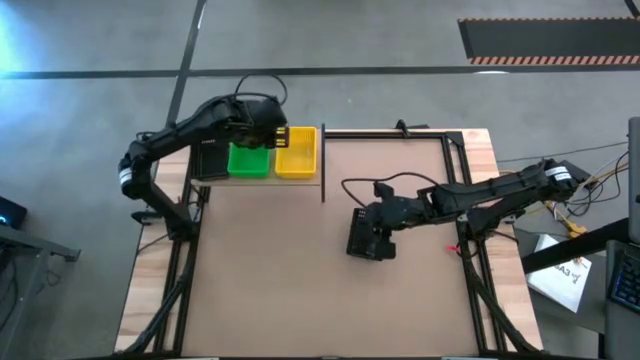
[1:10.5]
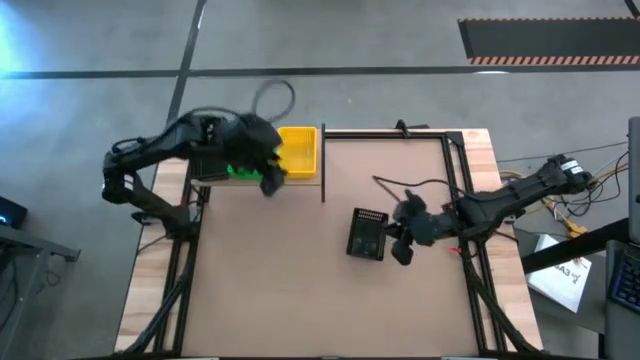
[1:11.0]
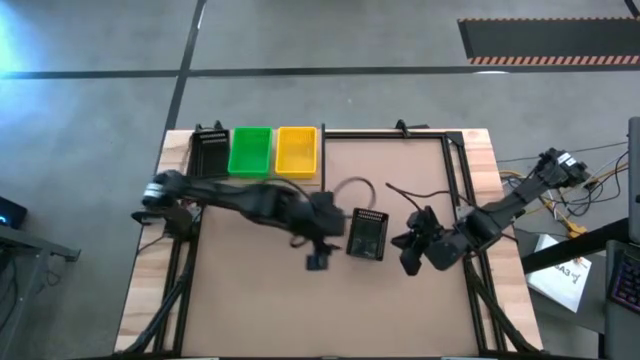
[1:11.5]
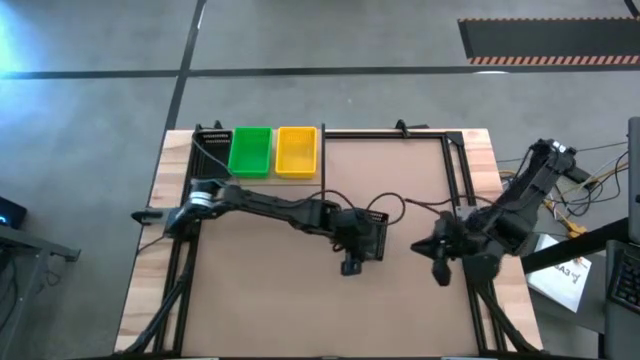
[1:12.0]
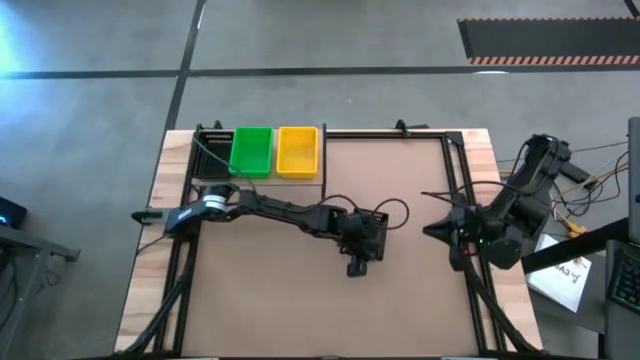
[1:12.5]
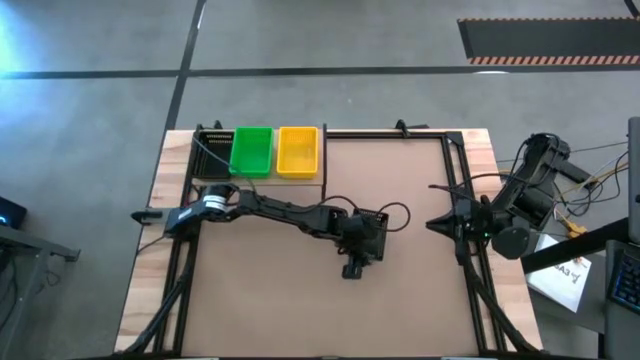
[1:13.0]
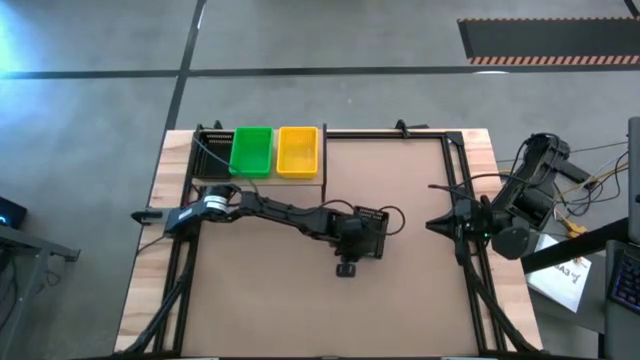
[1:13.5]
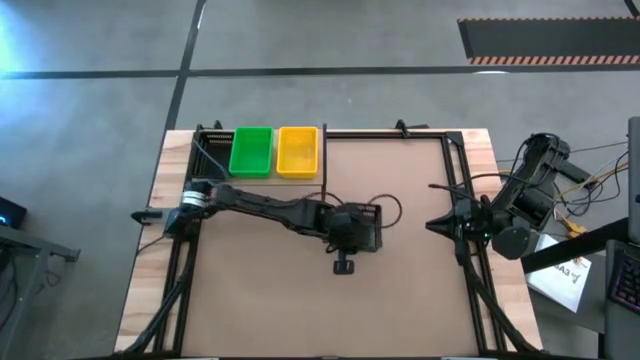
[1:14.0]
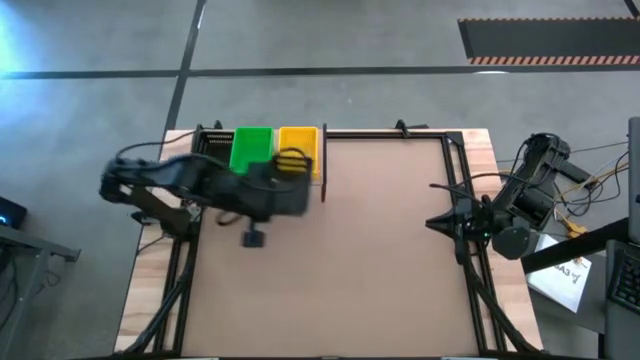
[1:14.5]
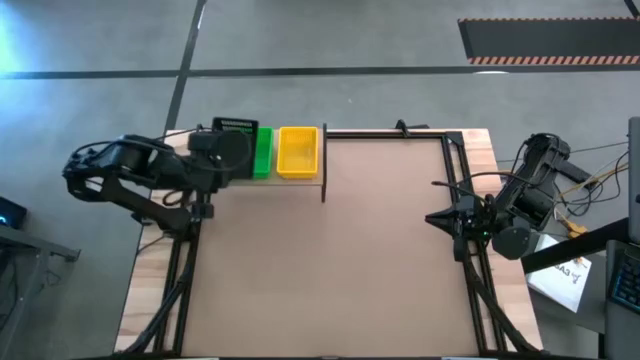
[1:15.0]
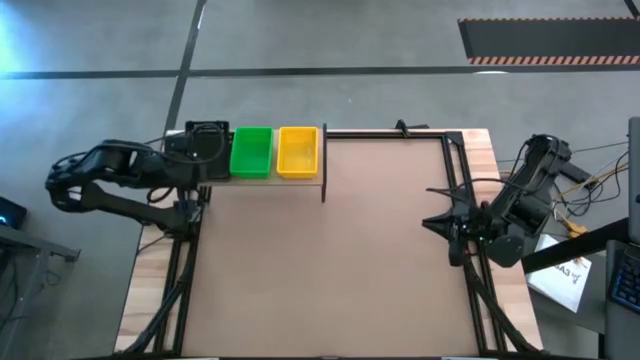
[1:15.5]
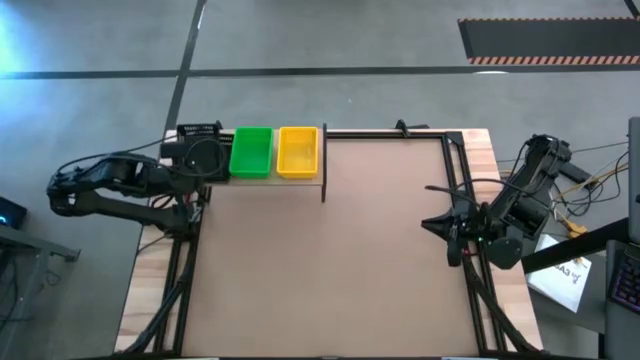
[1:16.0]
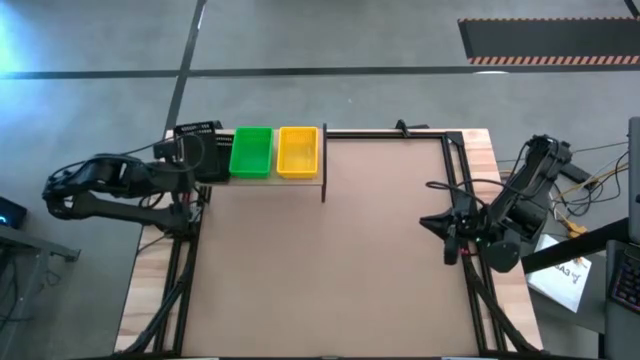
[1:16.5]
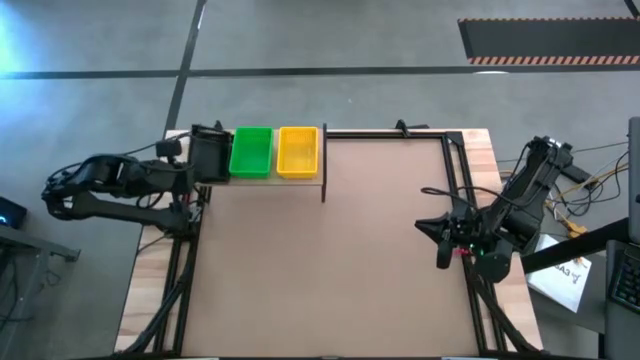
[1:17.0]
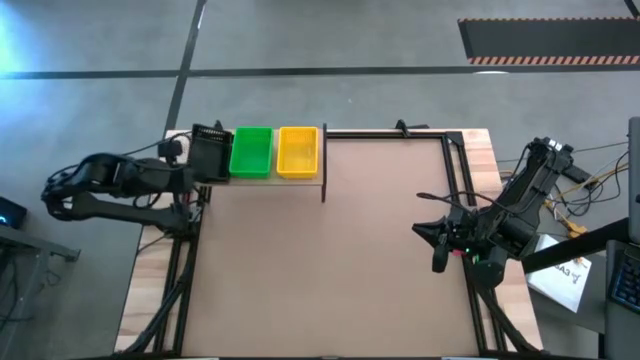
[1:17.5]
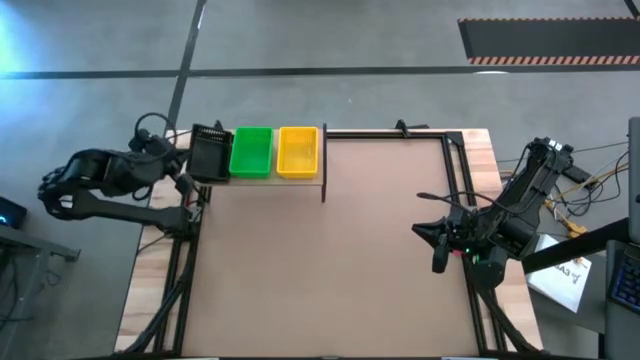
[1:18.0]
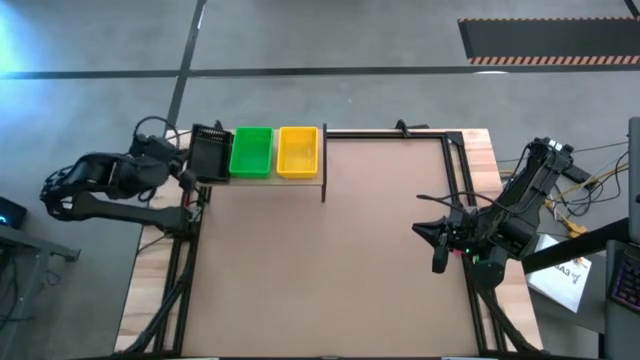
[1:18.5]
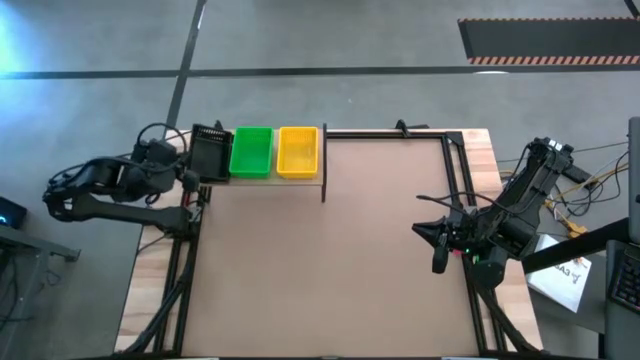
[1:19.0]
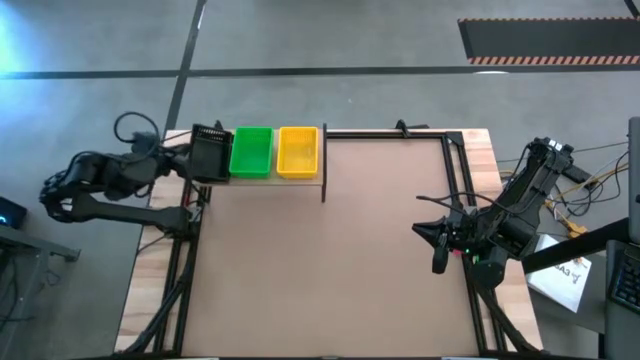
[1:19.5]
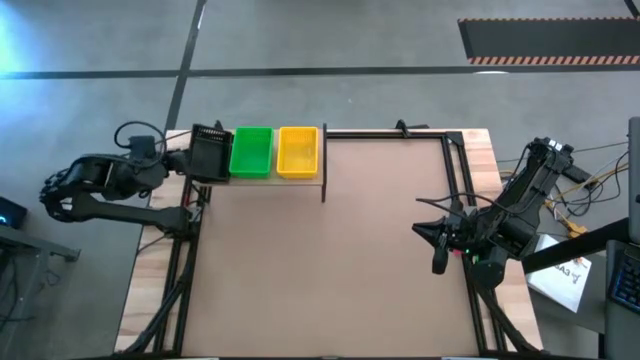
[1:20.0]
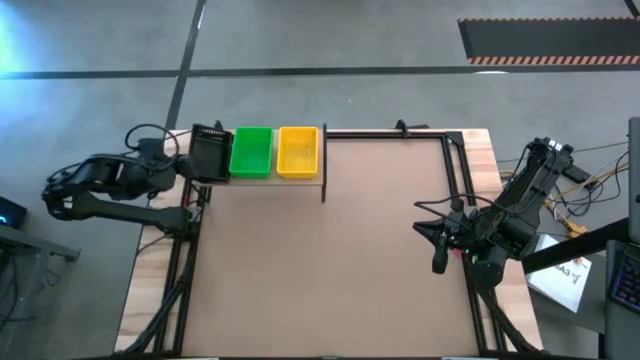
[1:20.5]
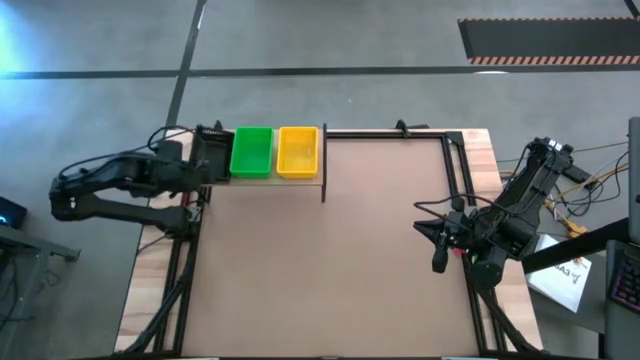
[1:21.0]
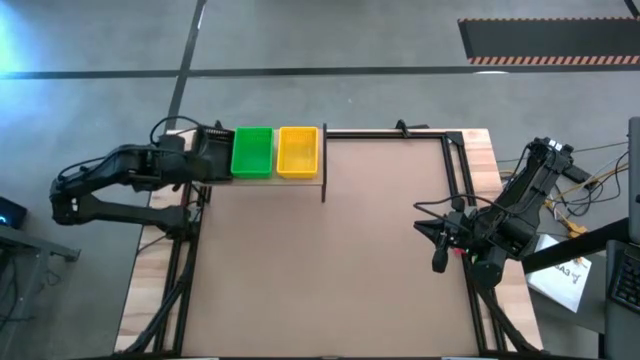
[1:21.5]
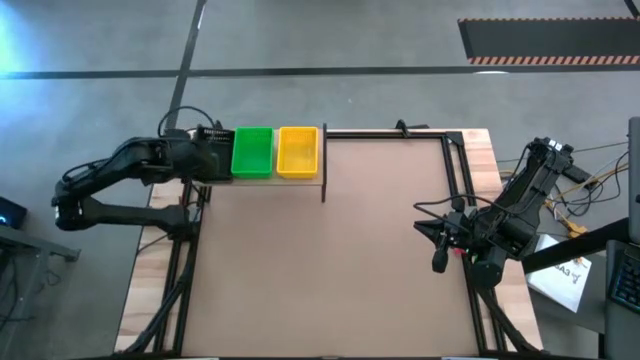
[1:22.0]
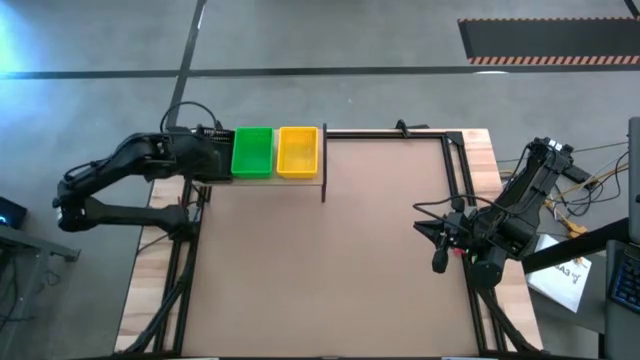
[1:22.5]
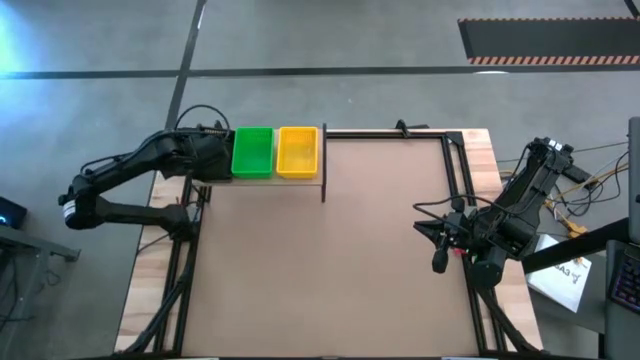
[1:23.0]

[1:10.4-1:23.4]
Task: Stack baskets on shelf by color
Stack the black bin on top of the other black bins on the shelf

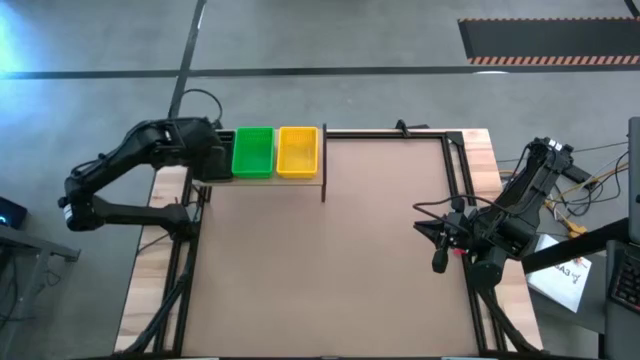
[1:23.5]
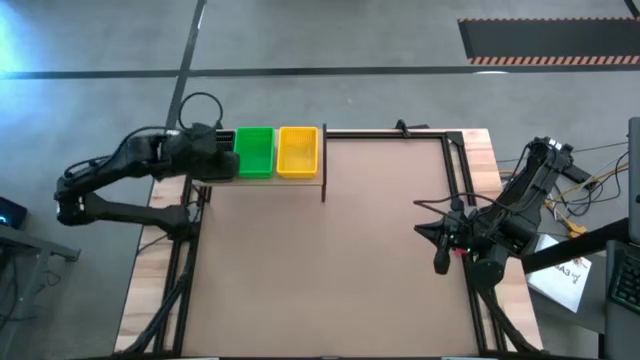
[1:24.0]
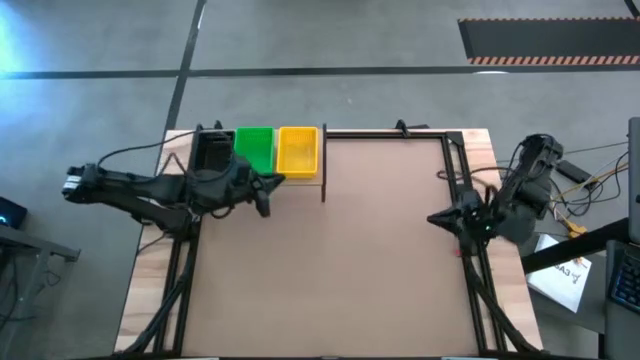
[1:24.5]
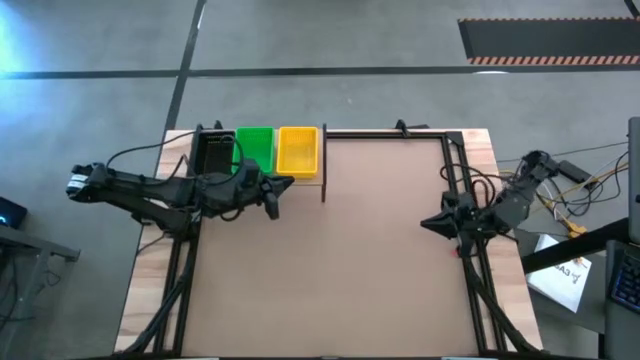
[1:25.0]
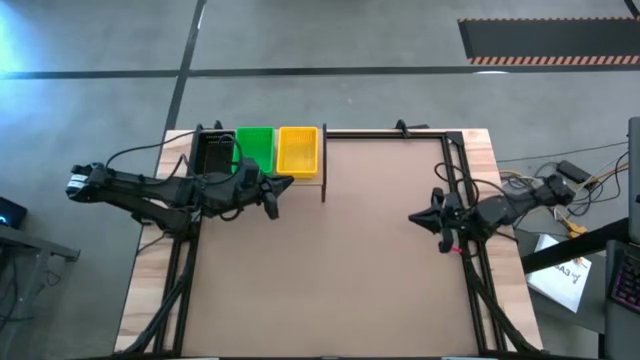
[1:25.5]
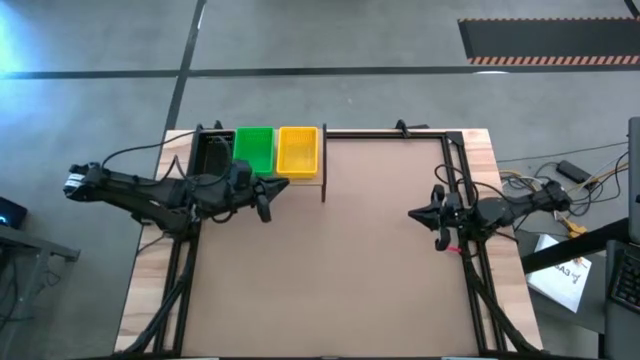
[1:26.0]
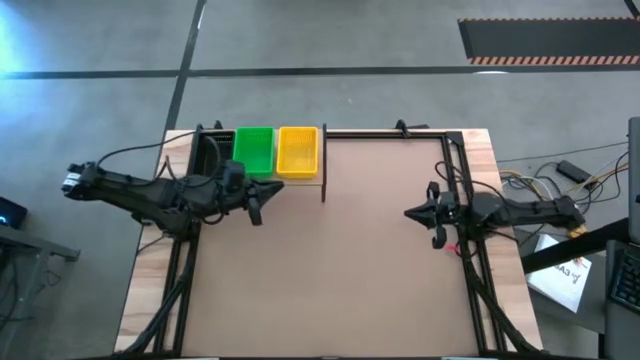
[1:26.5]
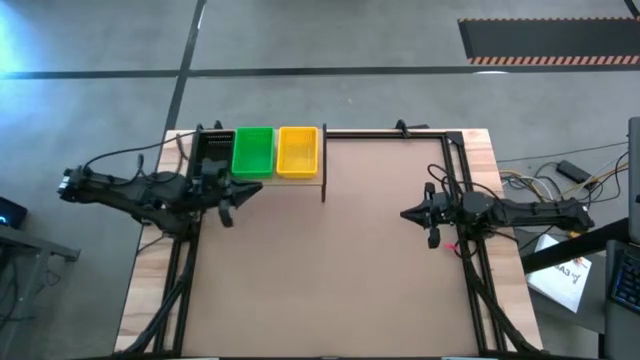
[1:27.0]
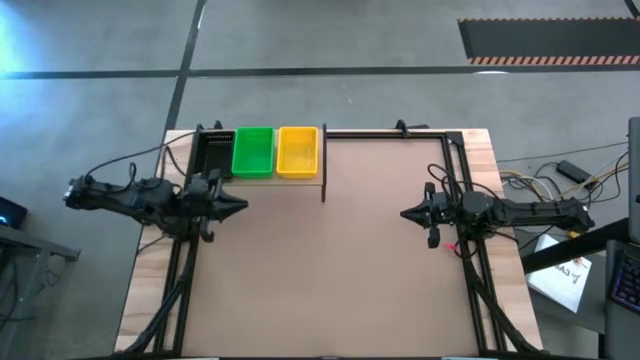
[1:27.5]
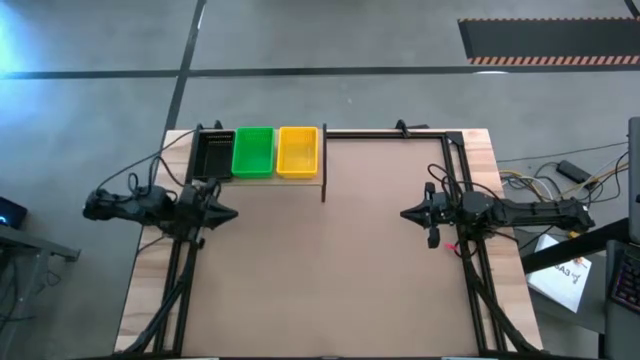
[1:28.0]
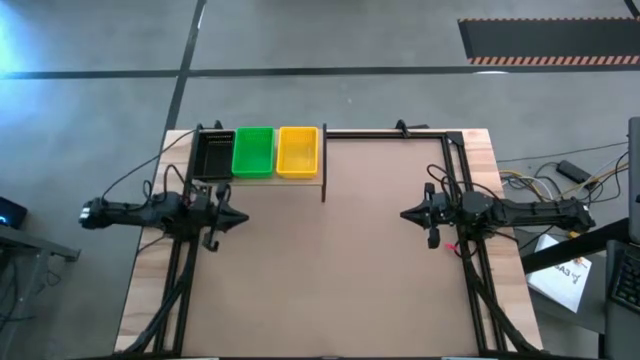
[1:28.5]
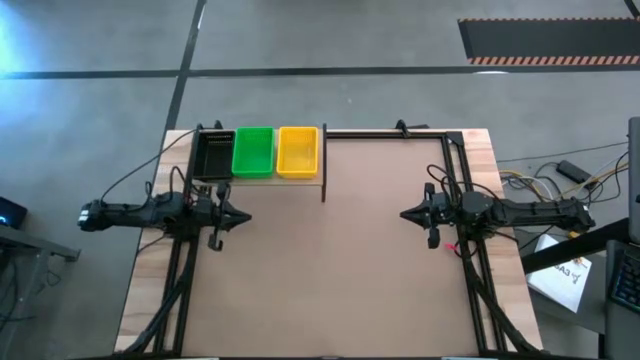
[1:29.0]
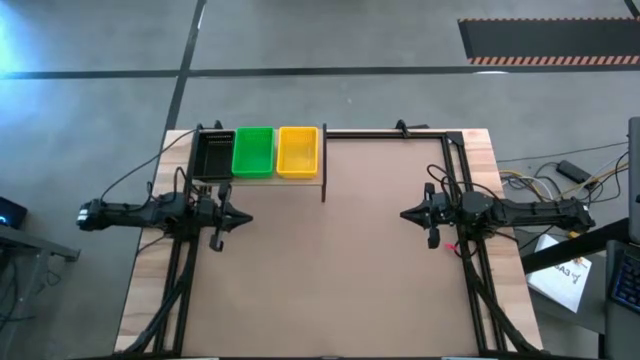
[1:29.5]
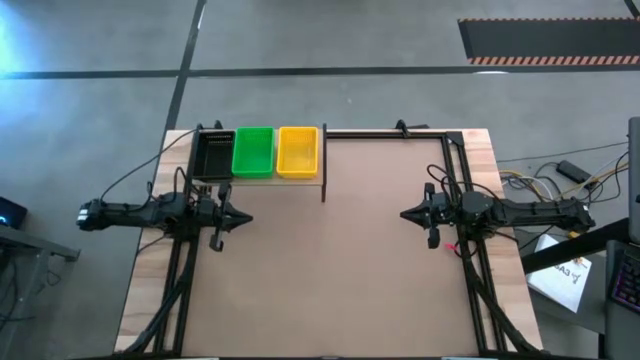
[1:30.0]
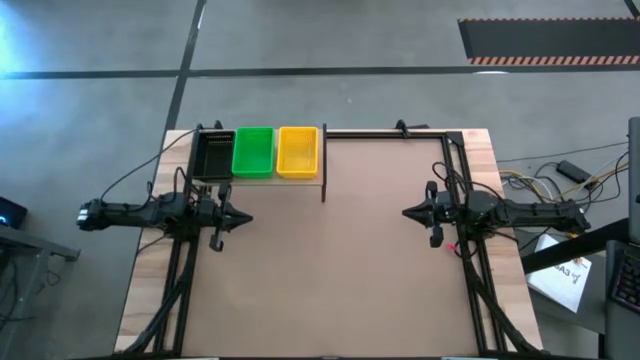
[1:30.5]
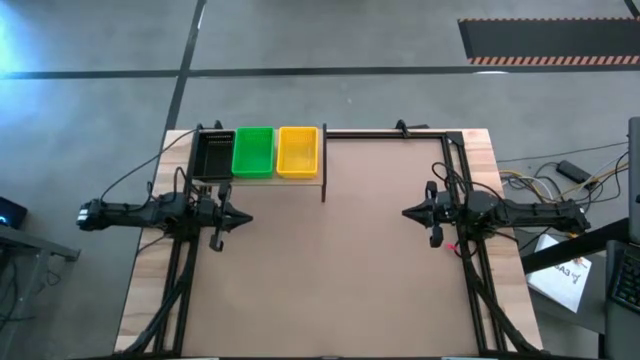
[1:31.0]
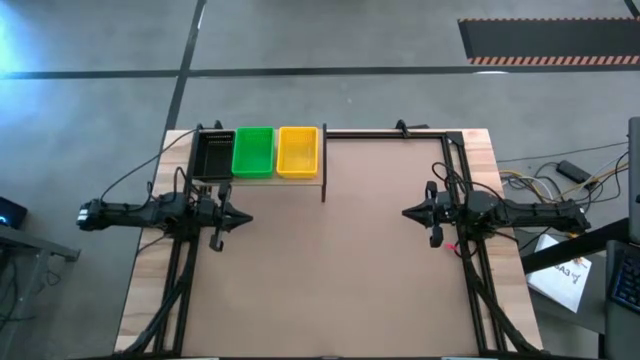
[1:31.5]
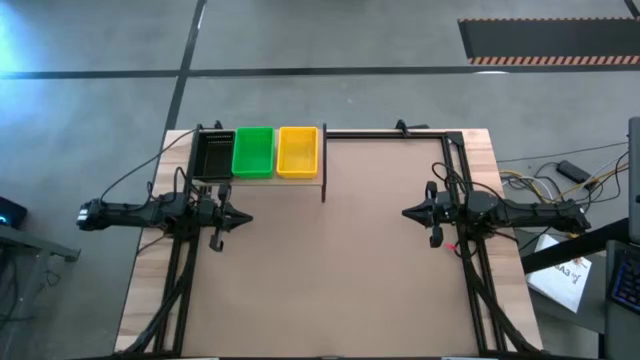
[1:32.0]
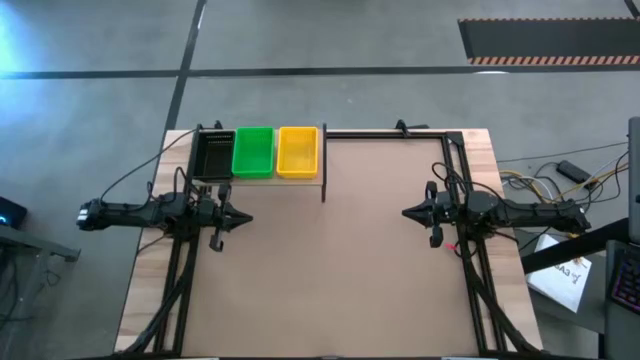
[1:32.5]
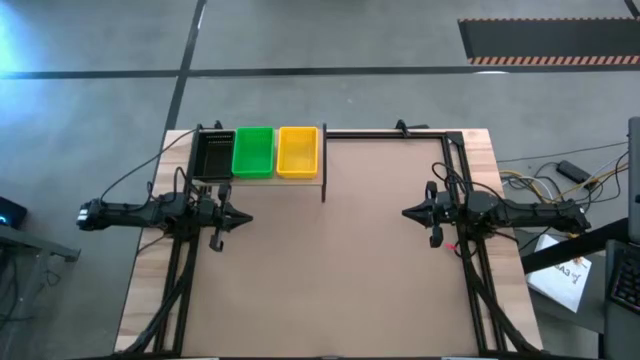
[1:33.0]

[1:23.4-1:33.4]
Return to Home Position
